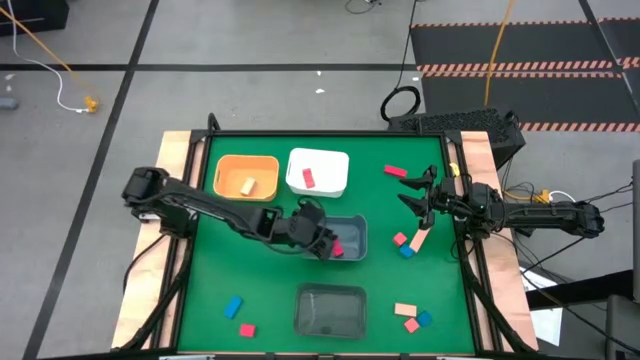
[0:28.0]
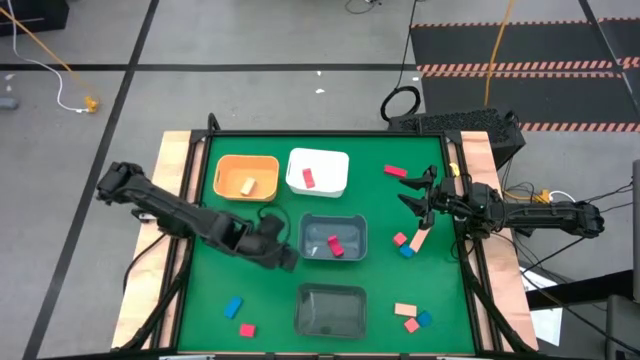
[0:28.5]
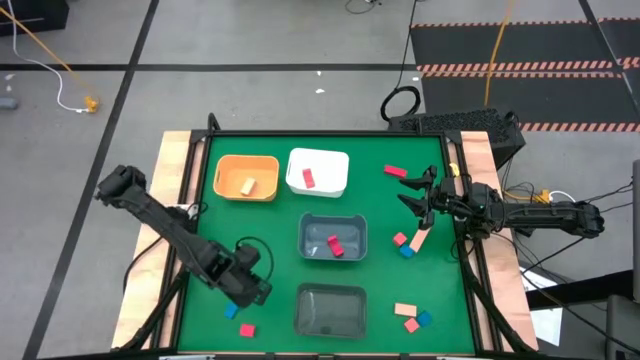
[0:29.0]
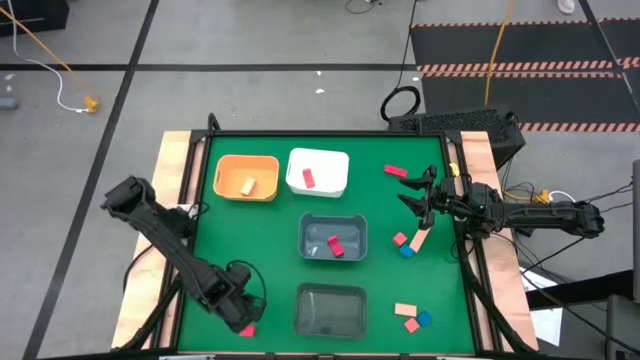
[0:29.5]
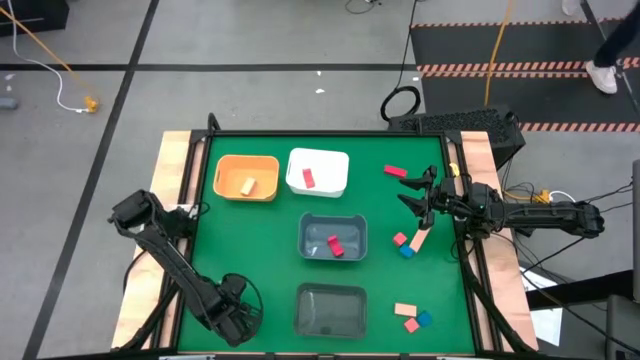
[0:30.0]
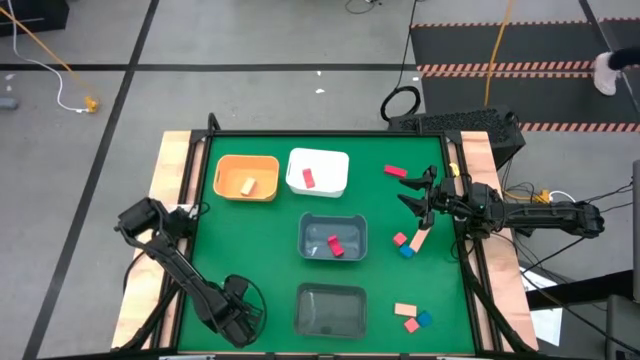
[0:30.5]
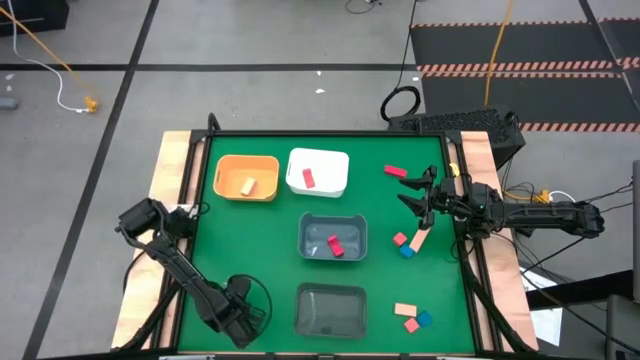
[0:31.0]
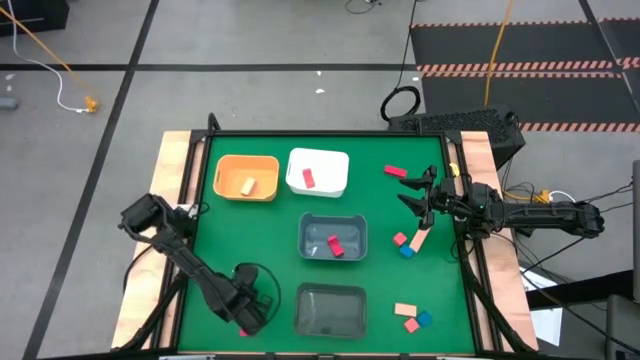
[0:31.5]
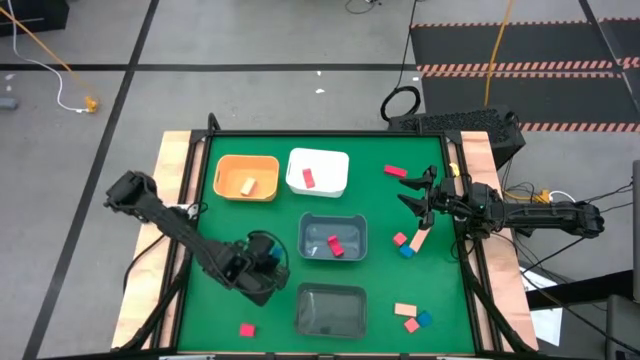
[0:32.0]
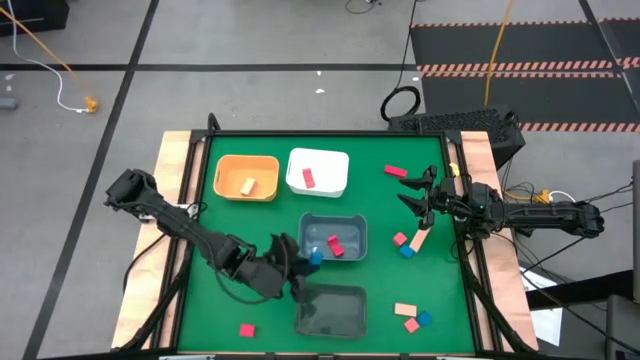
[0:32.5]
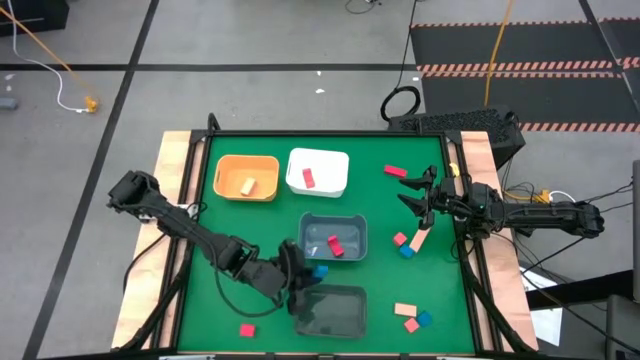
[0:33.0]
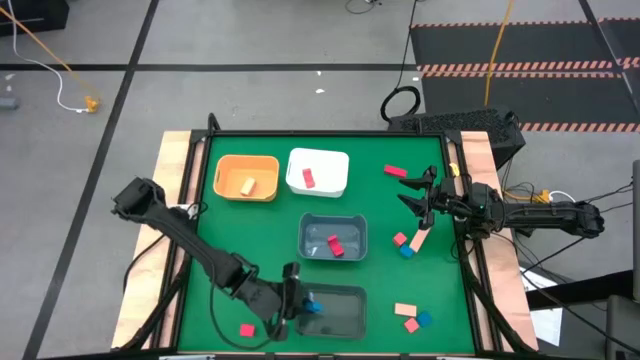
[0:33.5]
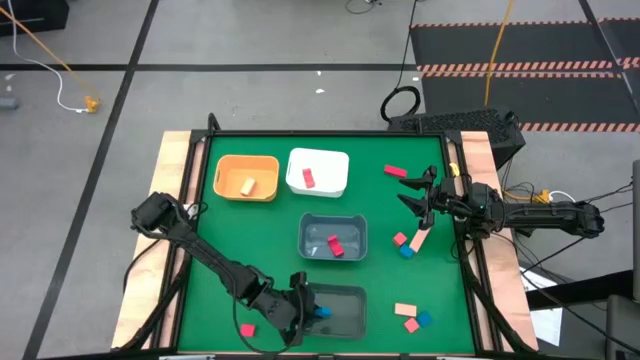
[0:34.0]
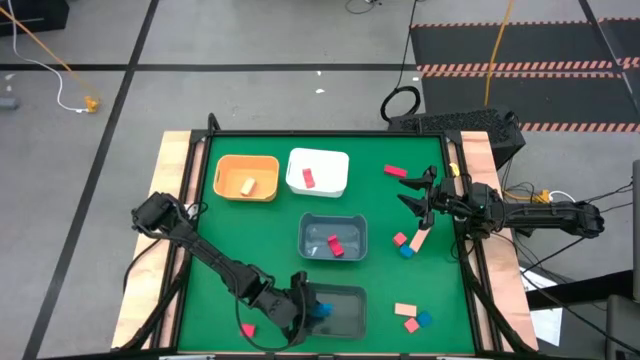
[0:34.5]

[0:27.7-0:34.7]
Task: Sort & place blocks by color
Put the bottom left blue wooden block into the black bin

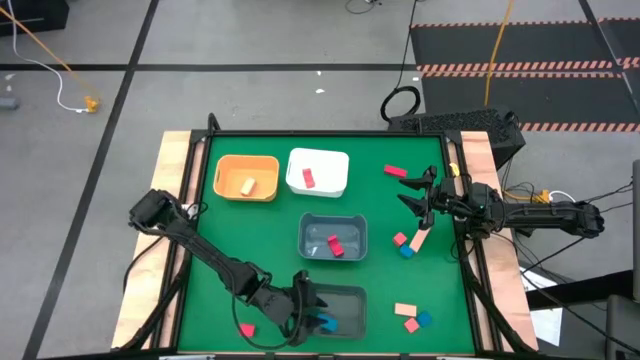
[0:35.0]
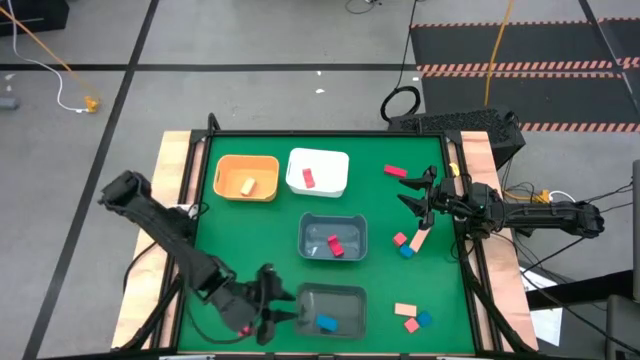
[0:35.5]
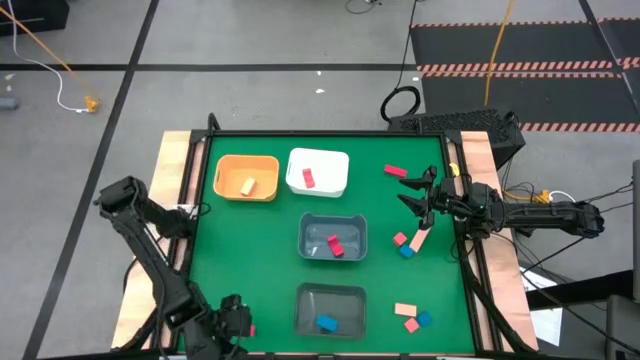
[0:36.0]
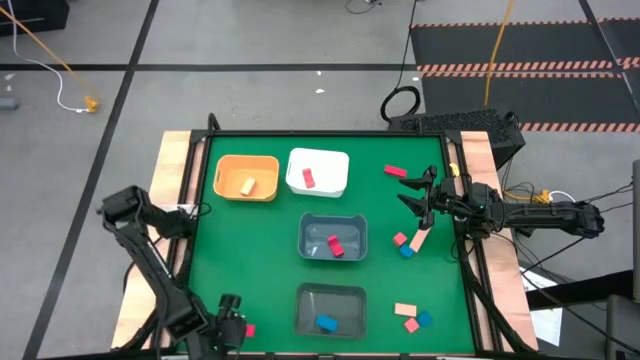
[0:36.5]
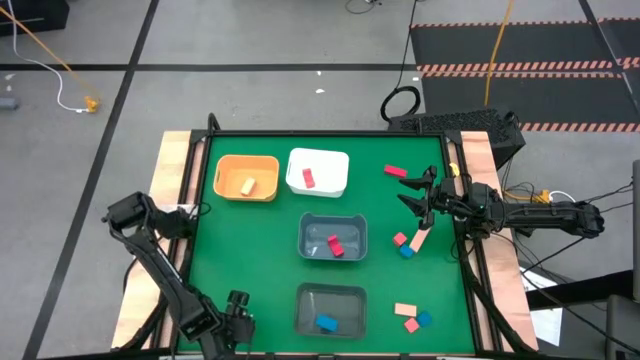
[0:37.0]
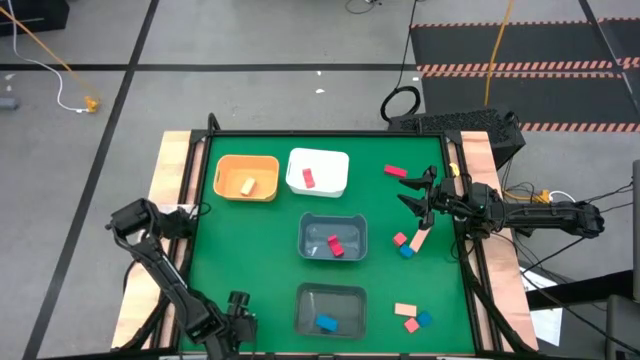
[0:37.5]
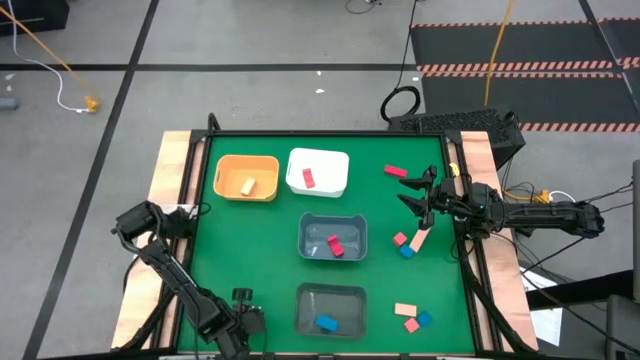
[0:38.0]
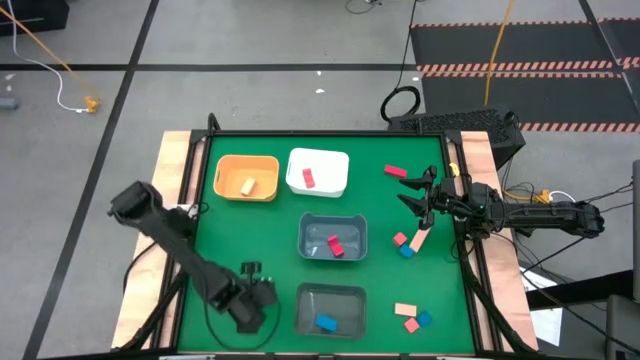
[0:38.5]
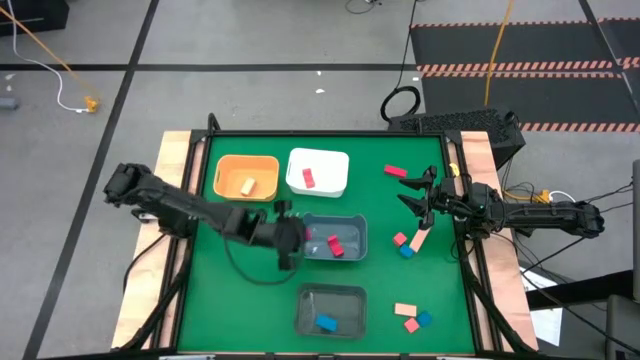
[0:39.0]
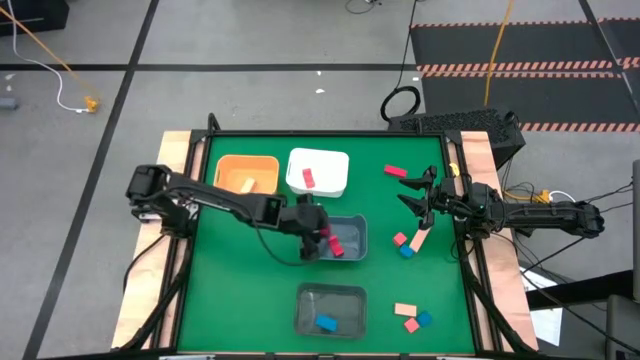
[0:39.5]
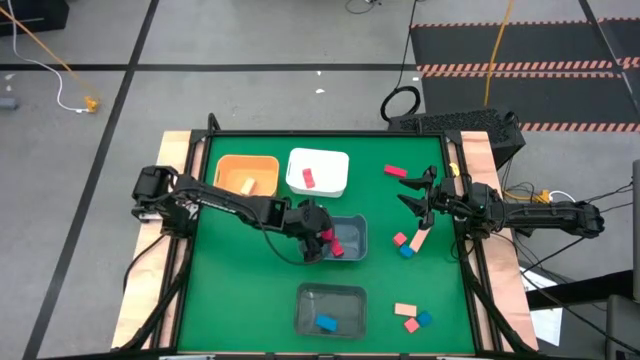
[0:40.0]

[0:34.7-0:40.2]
Put the bottom red wooden block into the blue bin

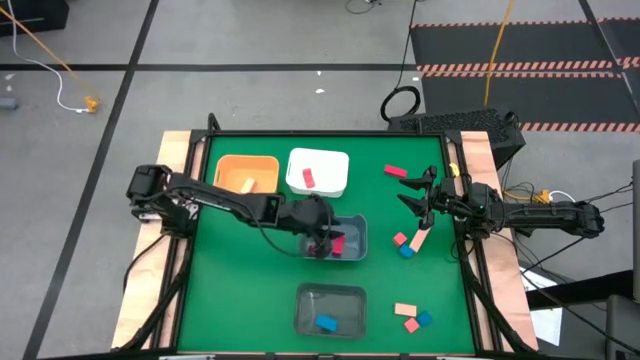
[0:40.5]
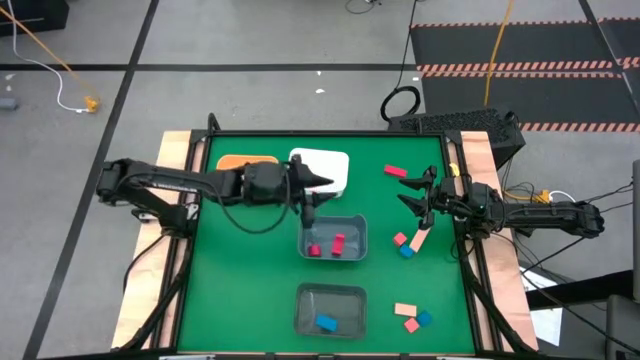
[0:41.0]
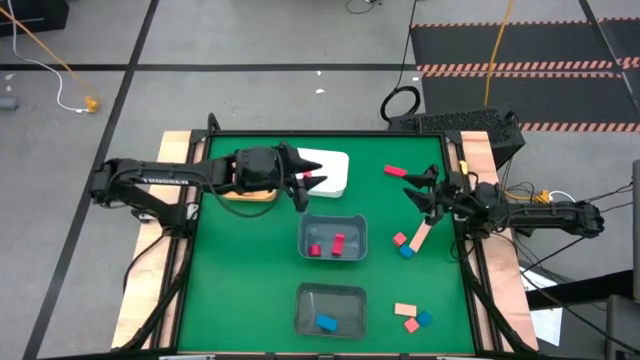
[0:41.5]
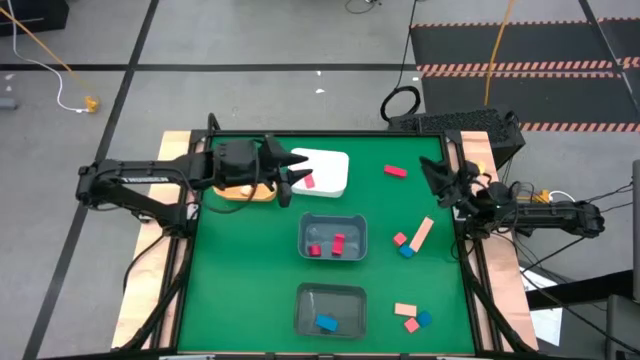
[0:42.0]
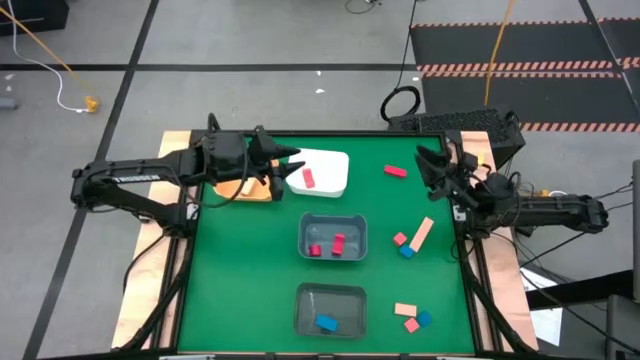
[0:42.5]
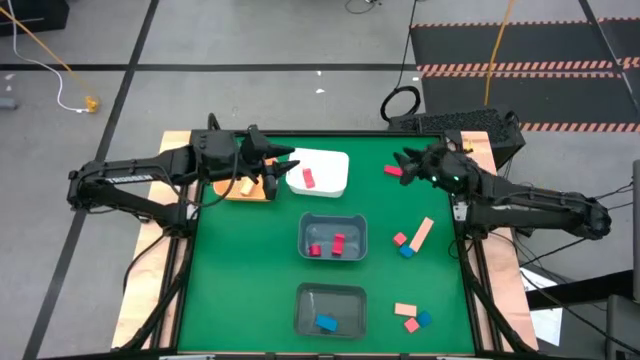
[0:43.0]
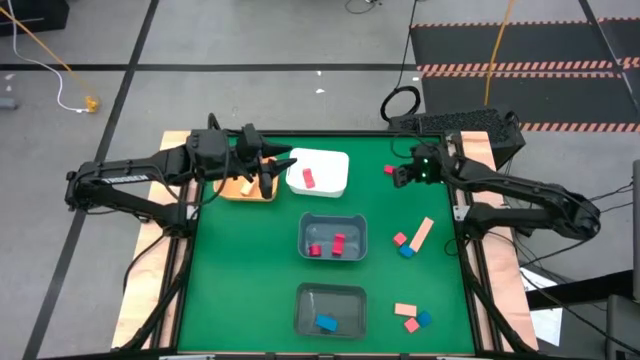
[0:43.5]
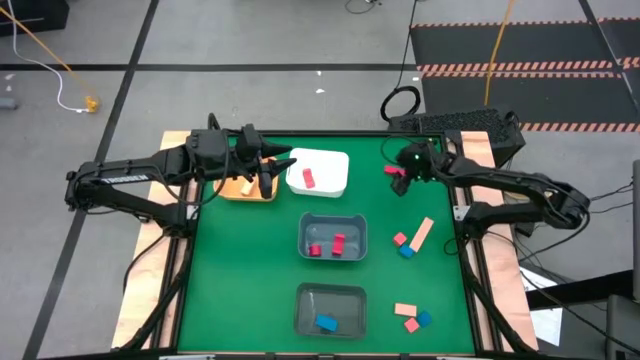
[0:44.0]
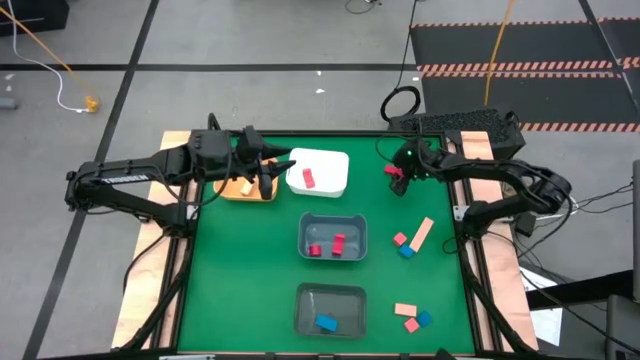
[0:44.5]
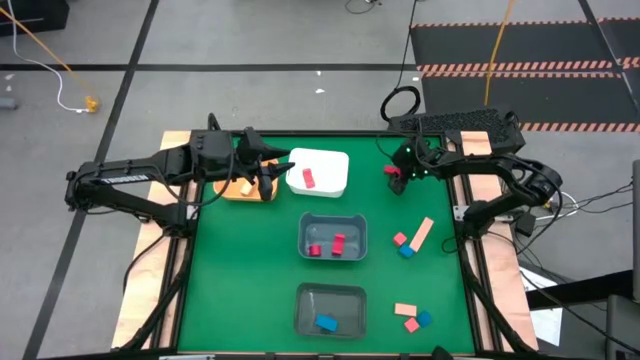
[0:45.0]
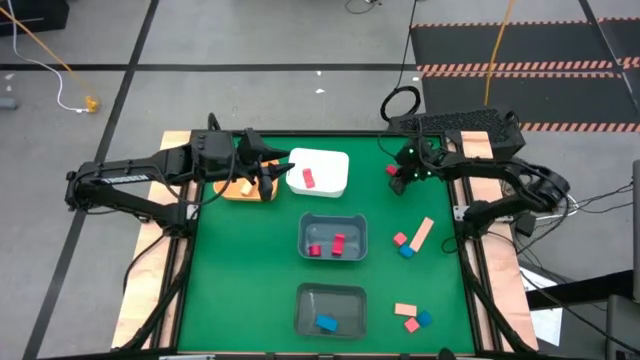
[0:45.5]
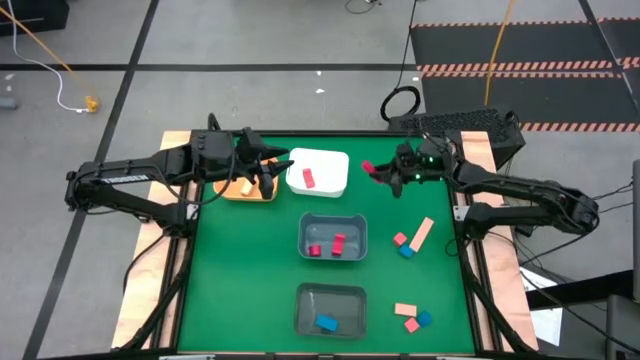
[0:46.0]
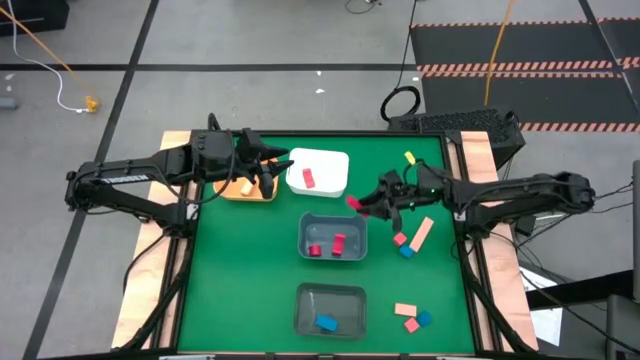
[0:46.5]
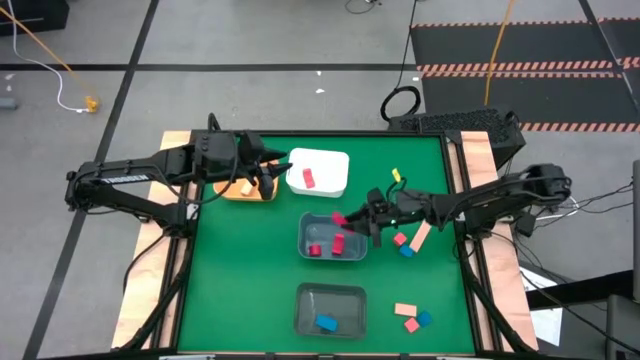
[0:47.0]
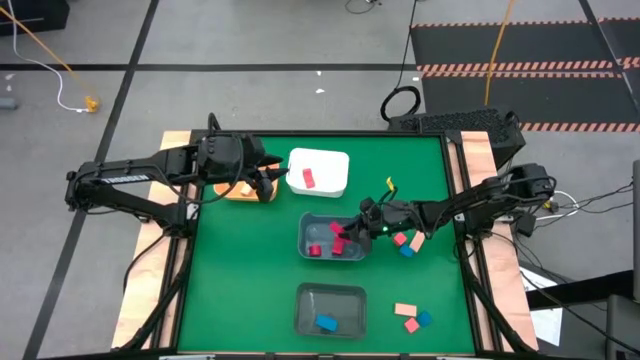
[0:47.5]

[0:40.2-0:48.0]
Put the red wooden block into the blue bin

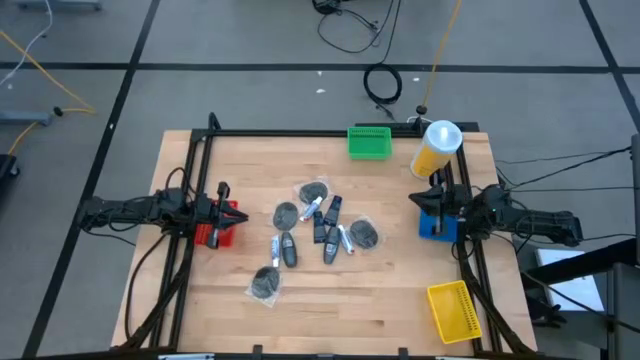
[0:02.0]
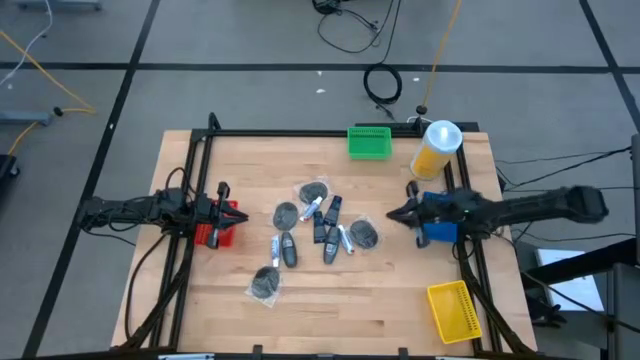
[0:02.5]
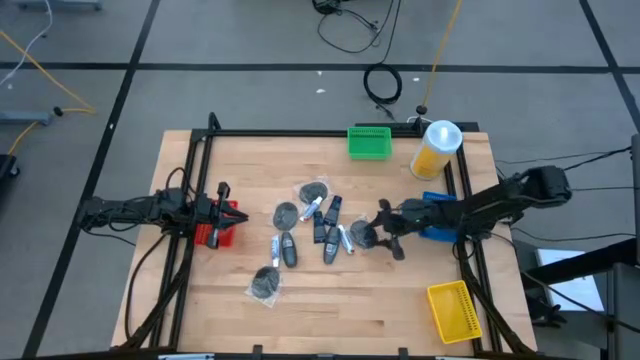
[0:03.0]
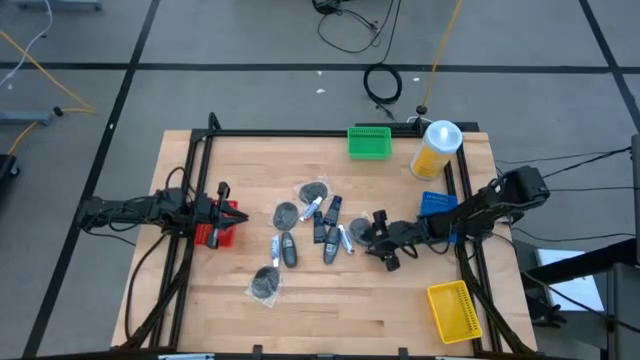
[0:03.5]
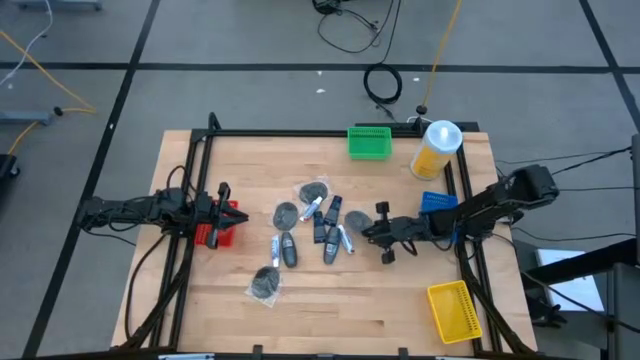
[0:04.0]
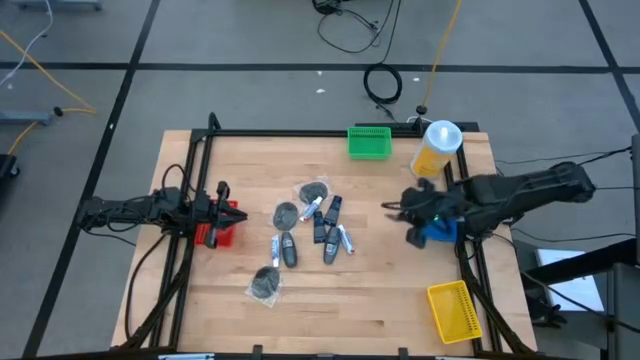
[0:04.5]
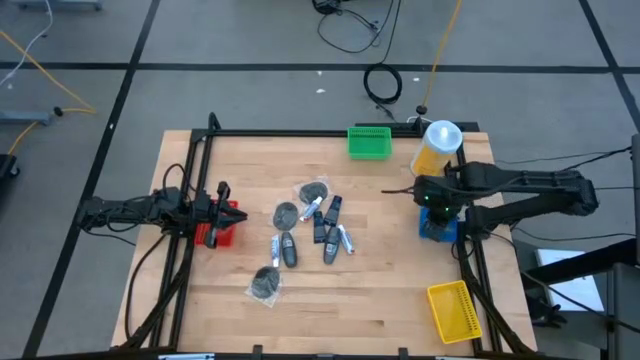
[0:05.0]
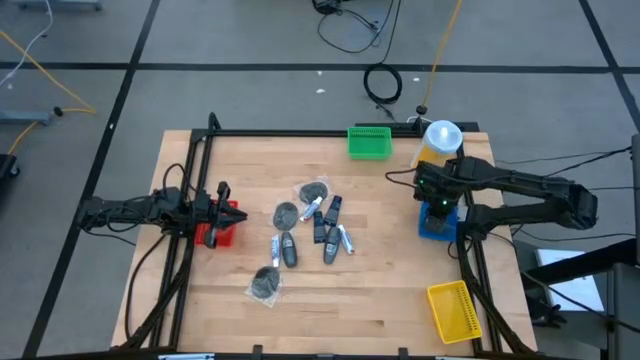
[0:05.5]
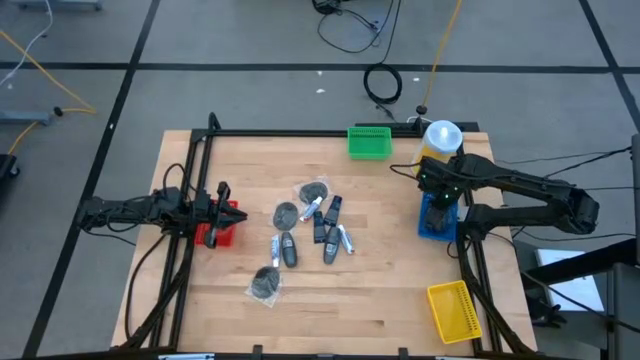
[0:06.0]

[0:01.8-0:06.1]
Task: Pick & Place Travel size toiletries
Put the black hairbrush into the blue bin
